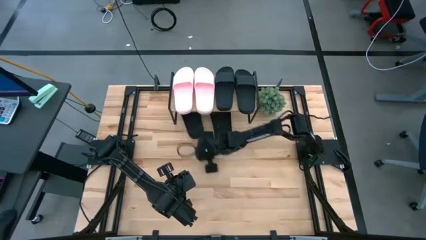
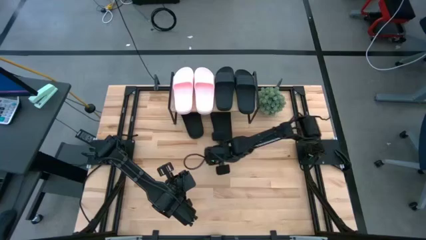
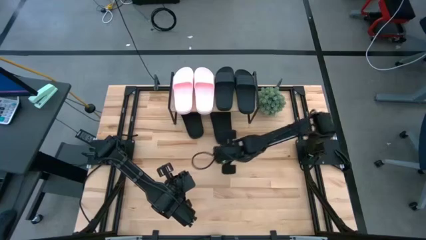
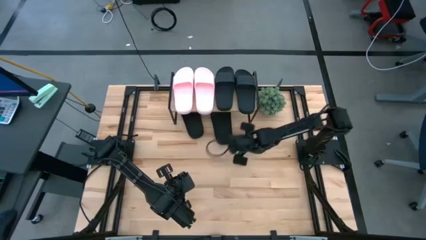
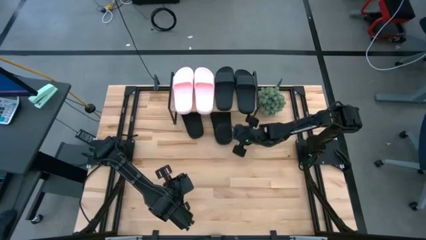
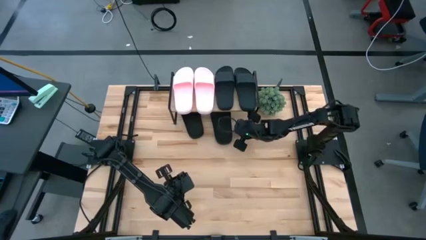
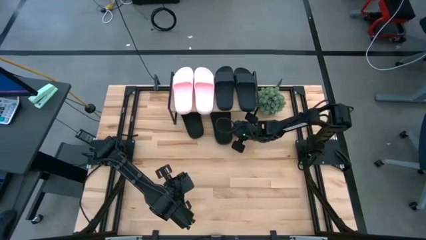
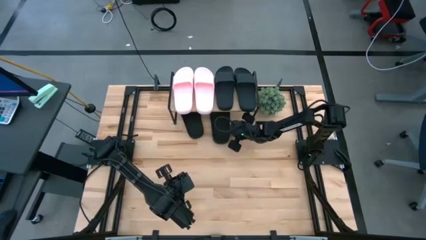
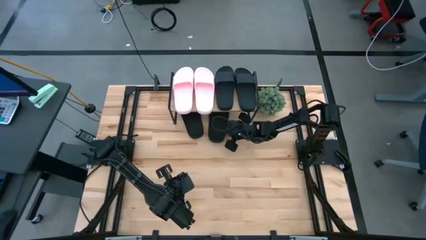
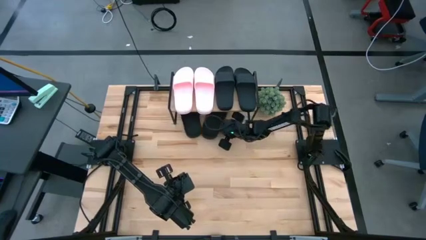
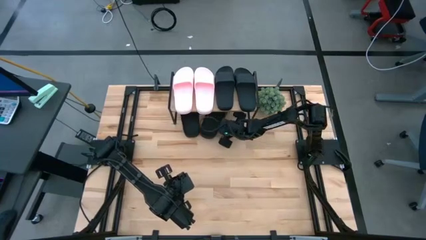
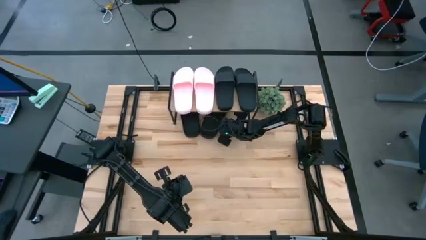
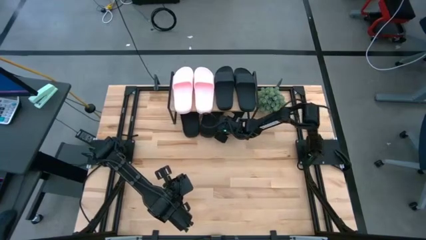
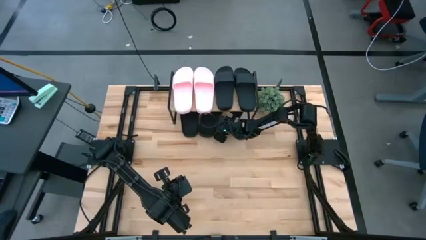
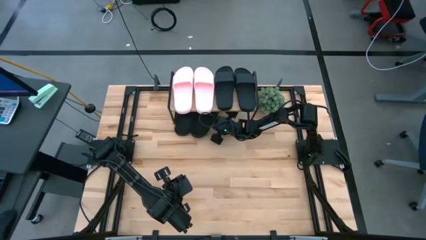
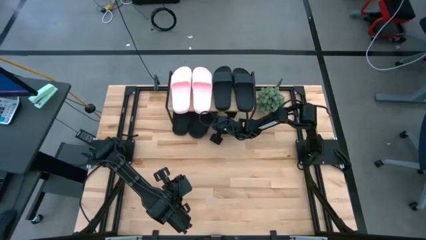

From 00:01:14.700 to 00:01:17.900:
Task: Pick and place slides into the shelf
Adjust the black slipper under the shelf

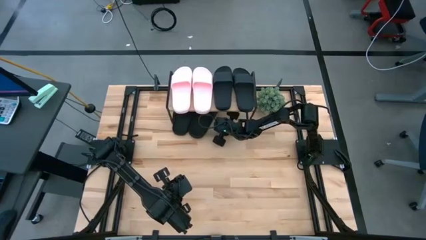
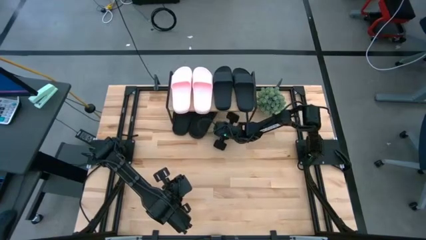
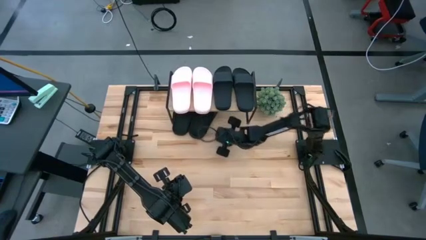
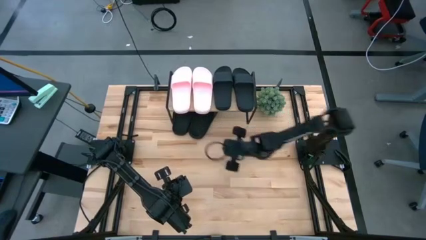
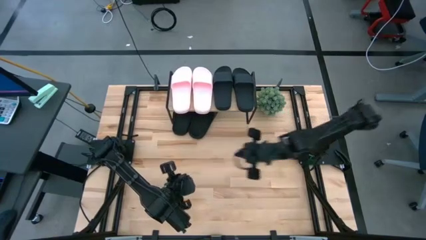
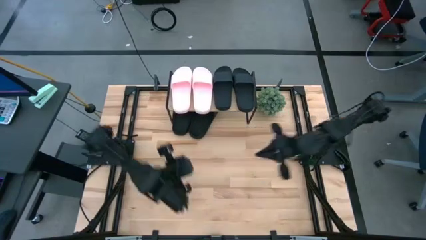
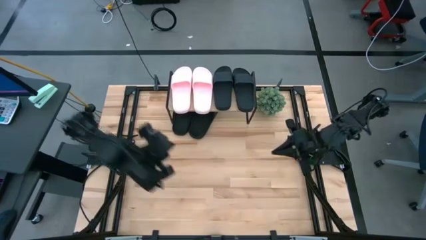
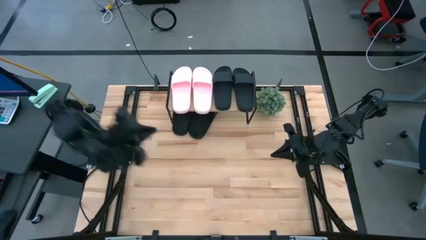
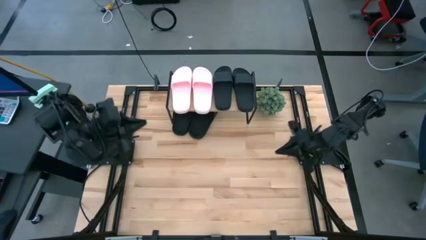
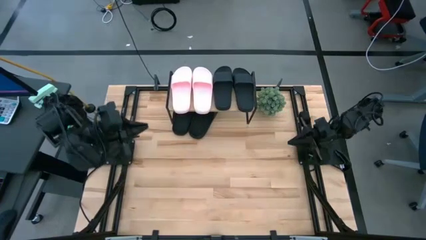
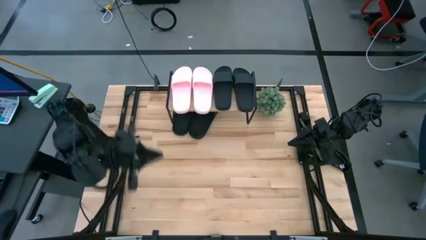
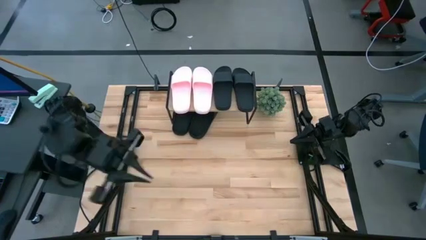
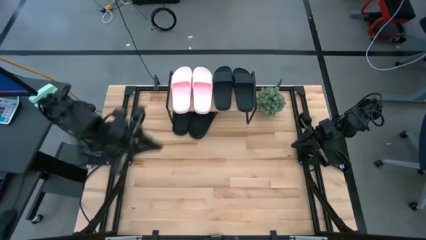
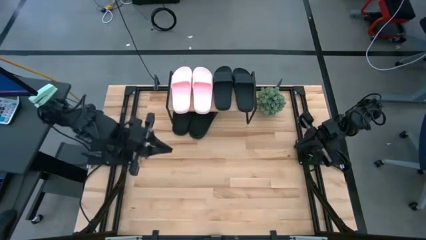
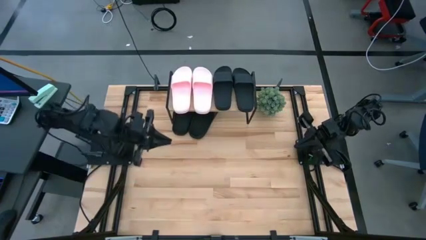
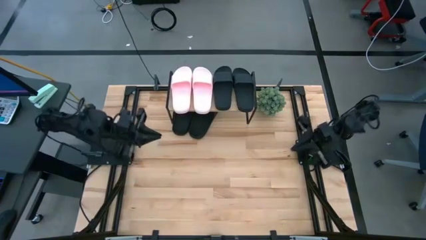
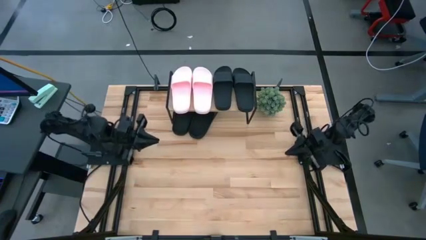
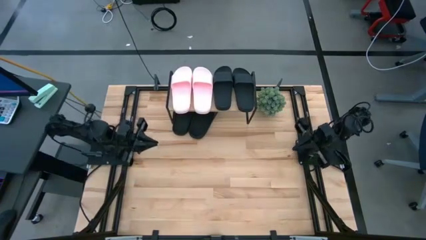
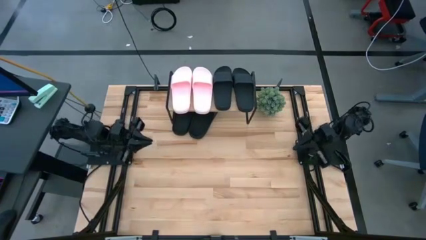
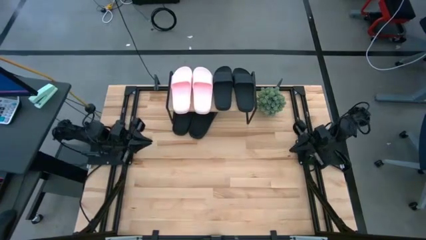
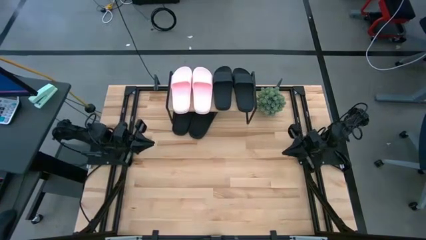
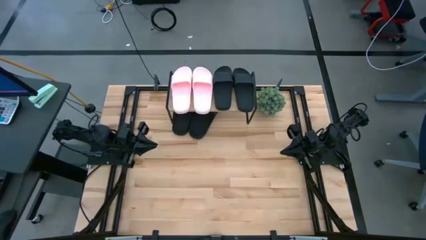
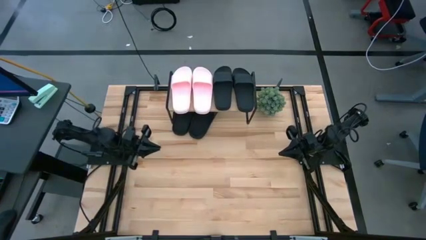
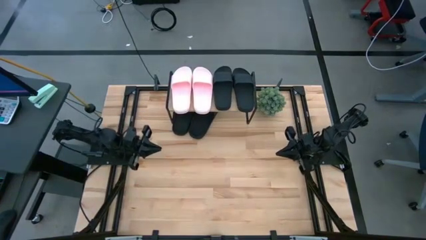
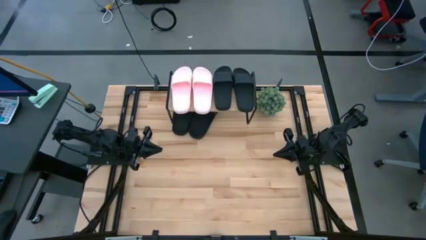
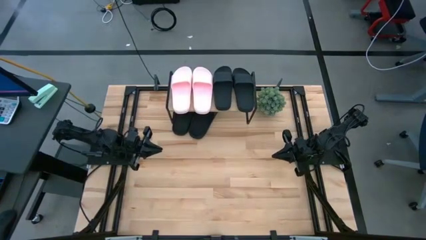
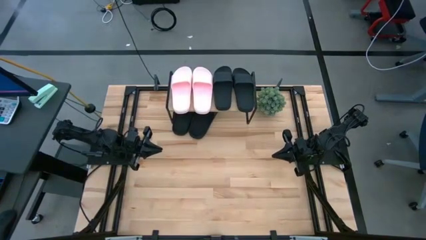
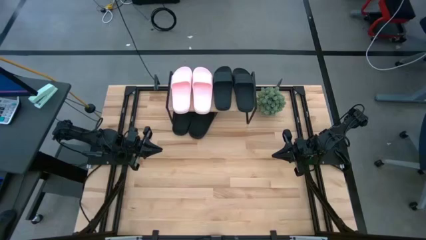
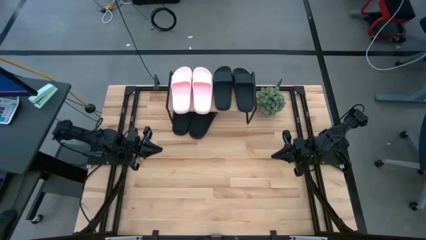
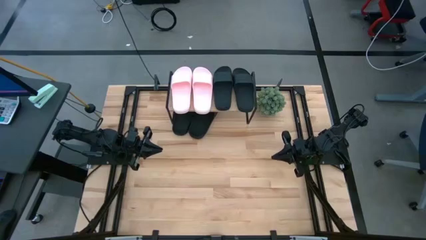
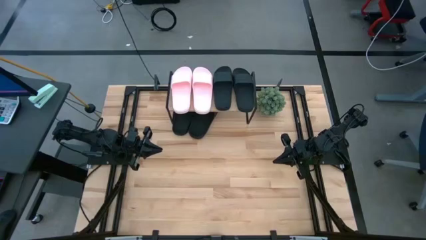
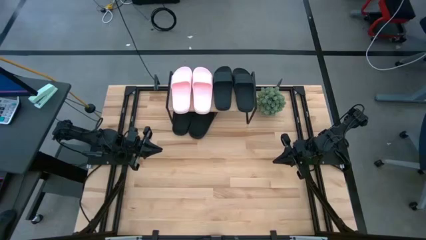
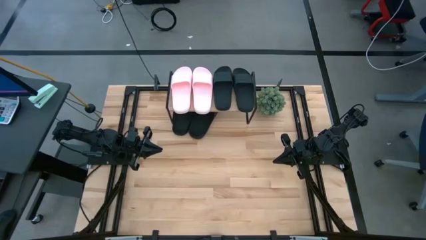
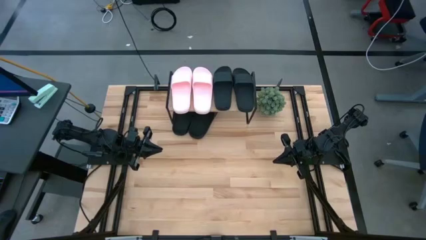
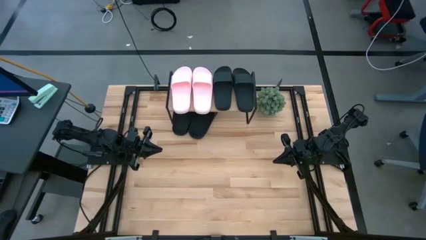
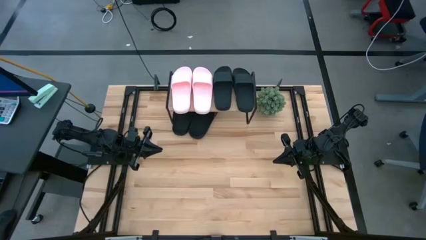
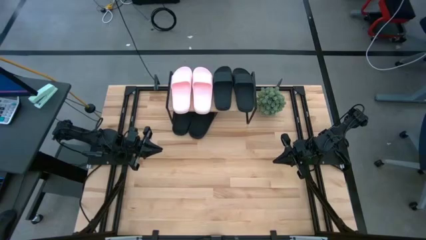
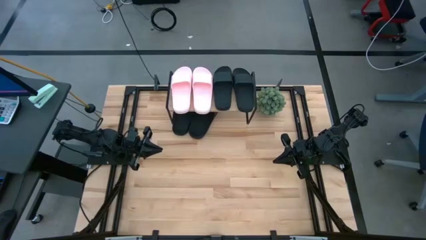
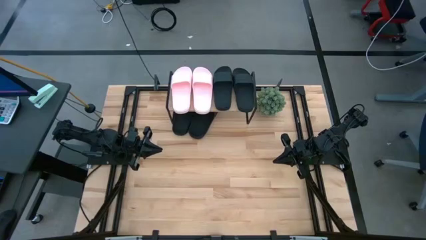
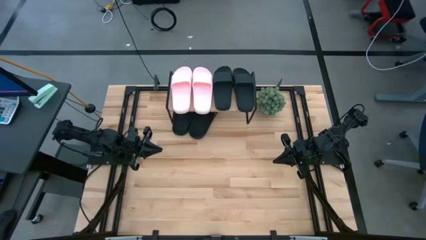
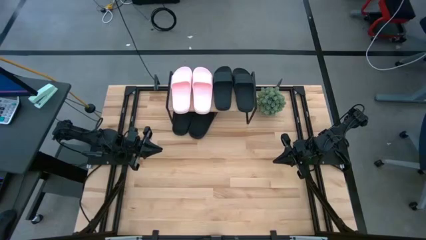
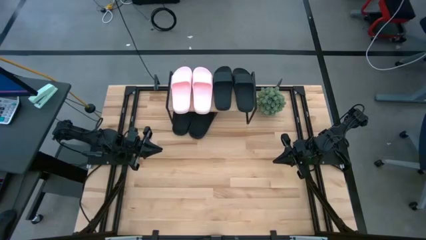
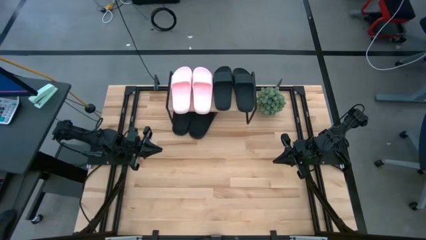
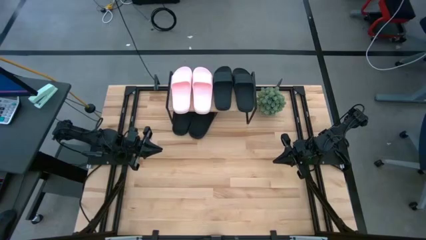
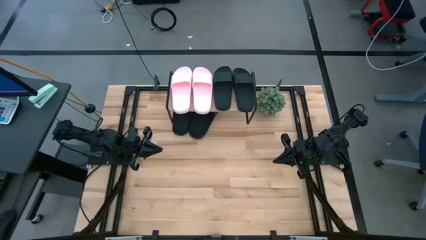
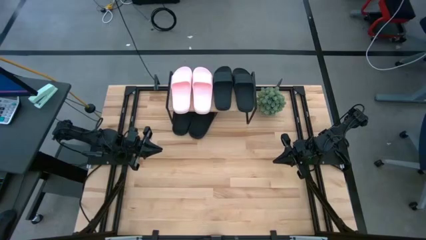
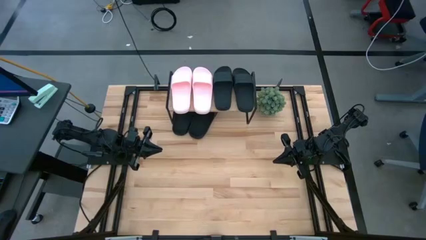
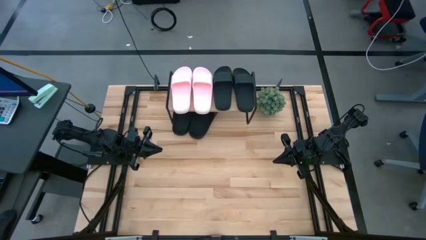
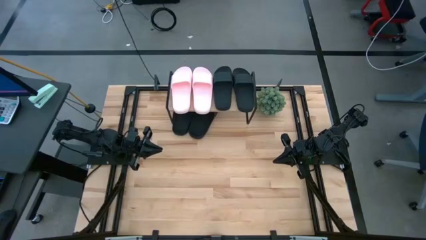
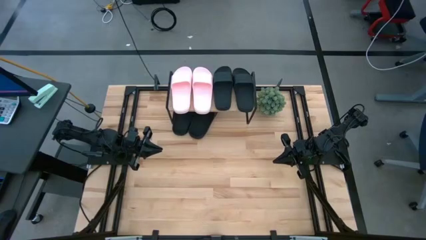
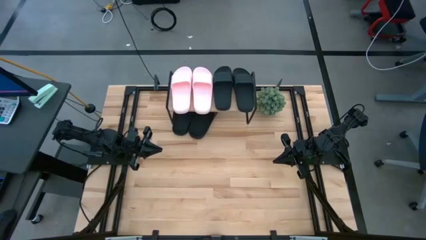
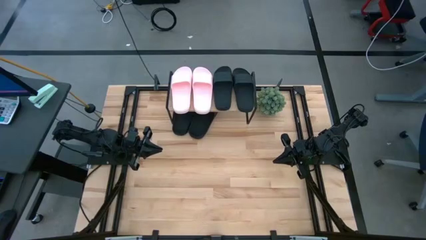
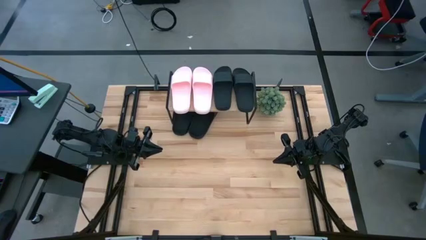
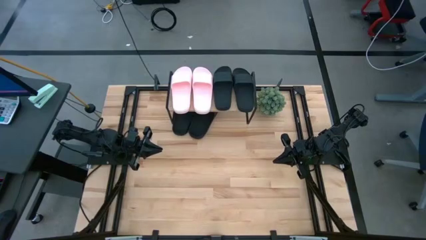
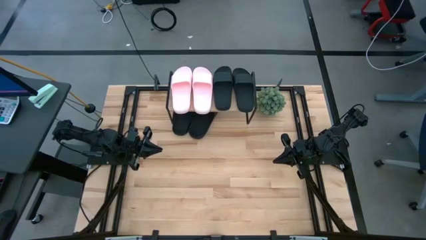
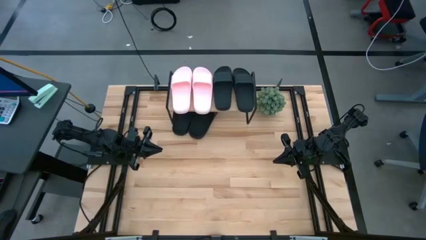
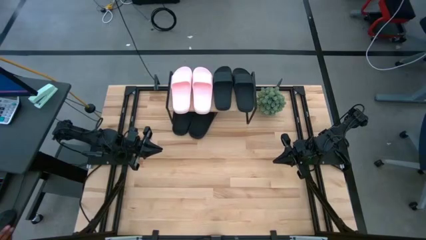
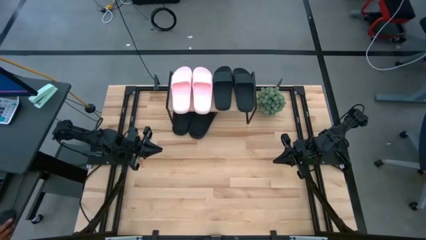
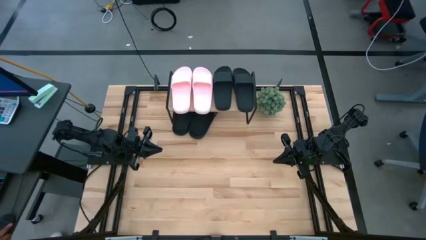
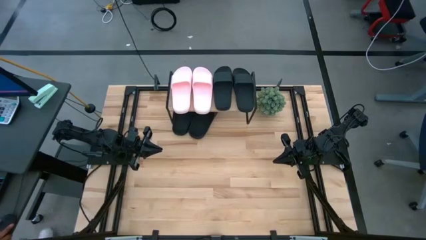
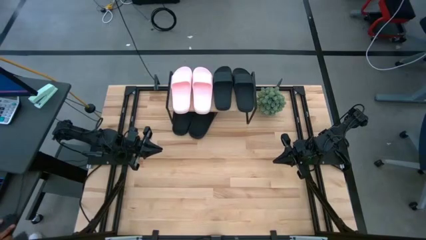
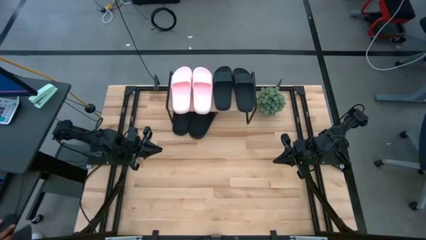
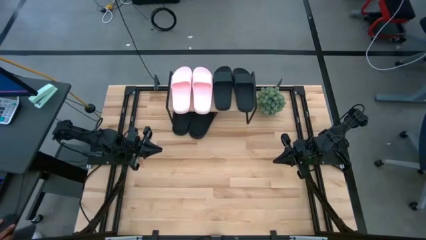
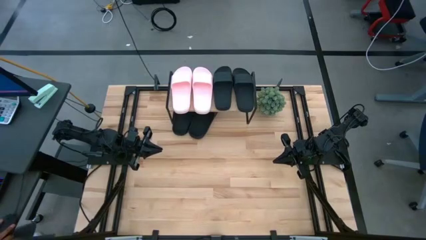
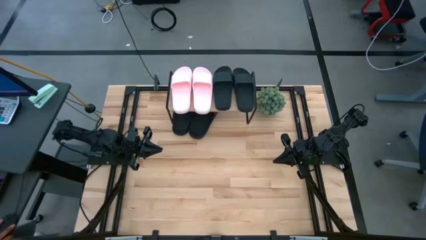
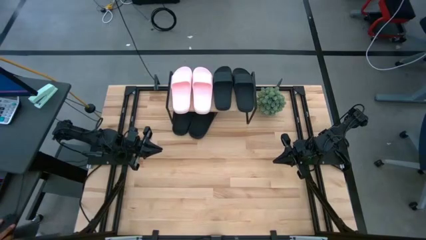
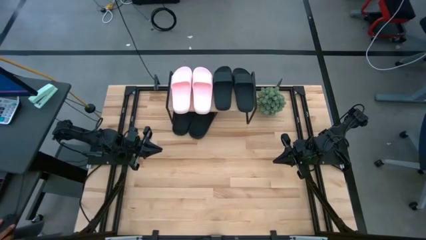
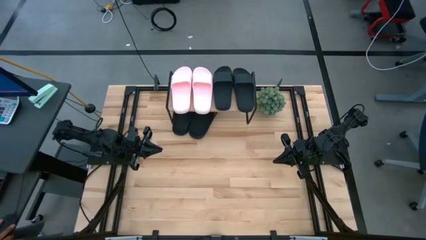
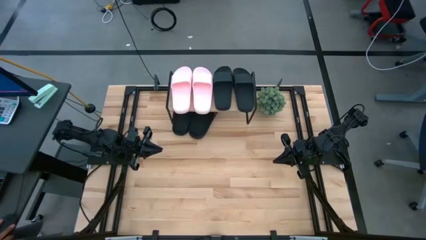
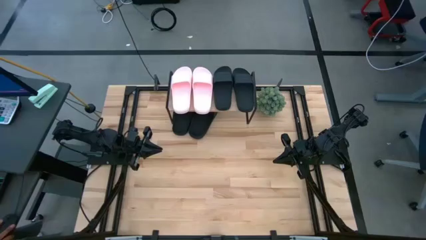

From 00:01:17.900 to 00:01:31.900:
Return to Home Position
